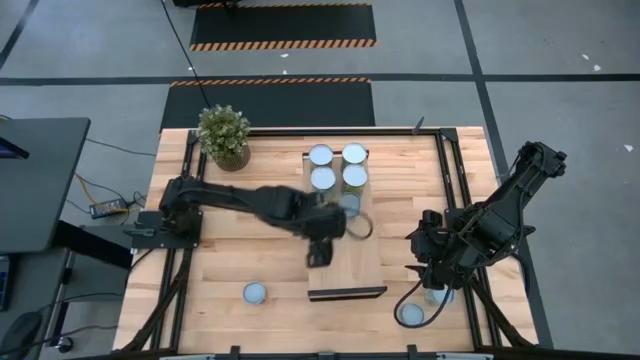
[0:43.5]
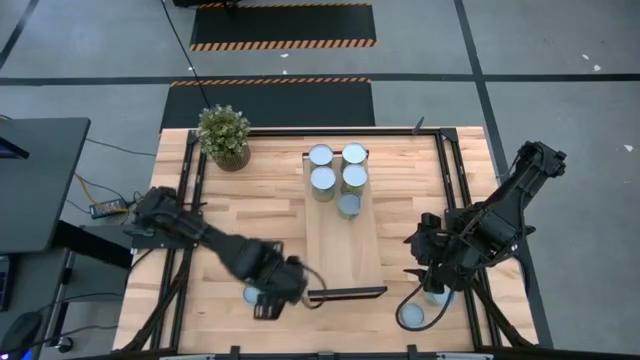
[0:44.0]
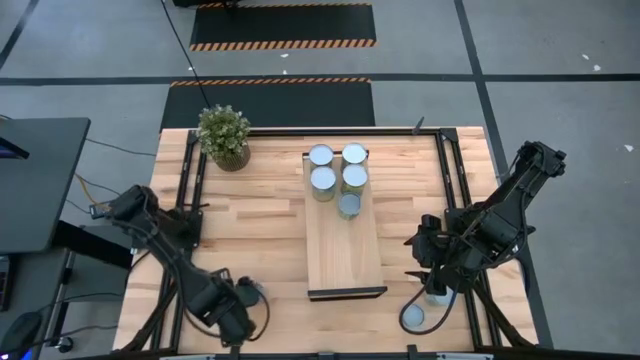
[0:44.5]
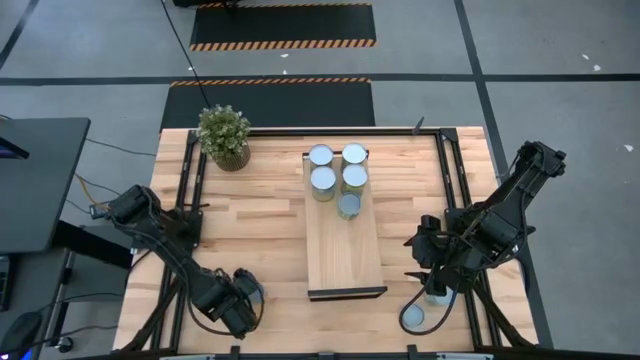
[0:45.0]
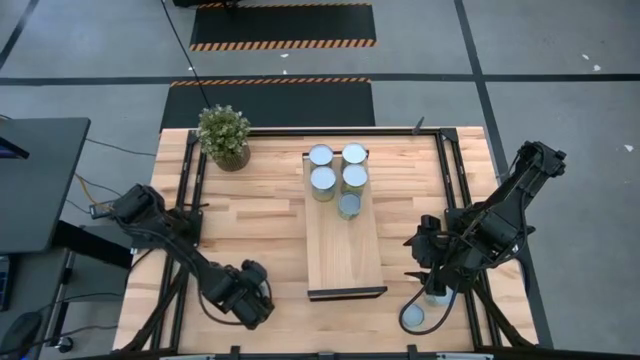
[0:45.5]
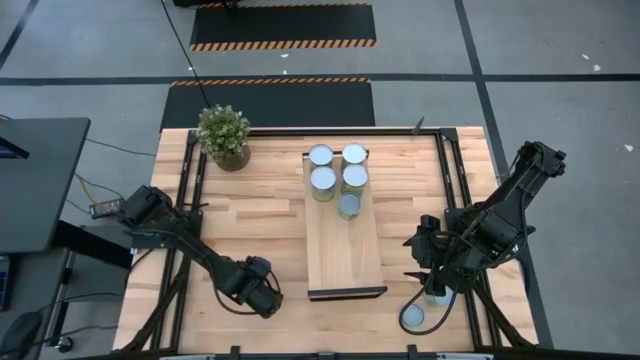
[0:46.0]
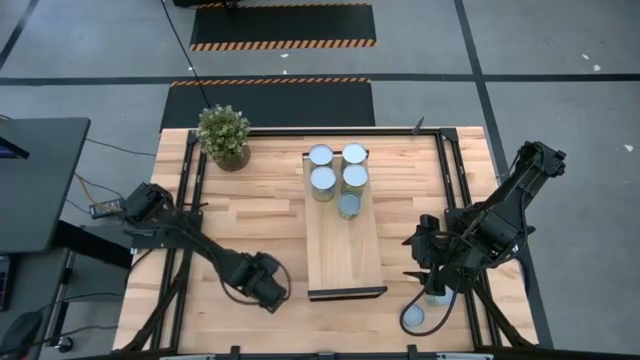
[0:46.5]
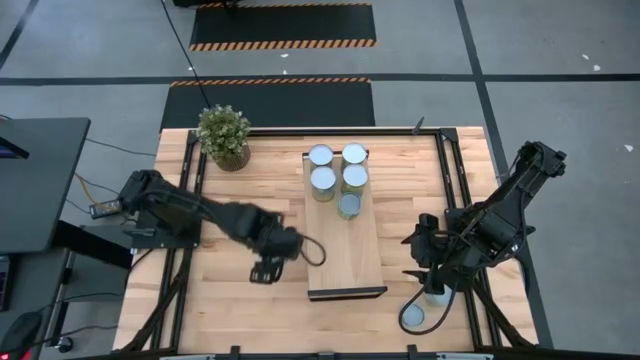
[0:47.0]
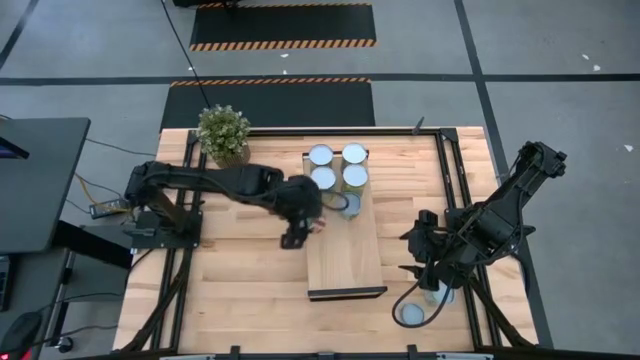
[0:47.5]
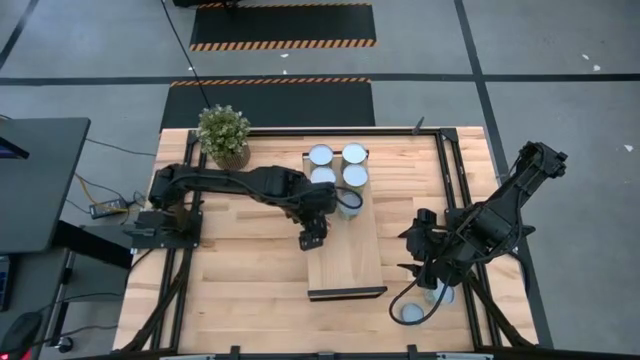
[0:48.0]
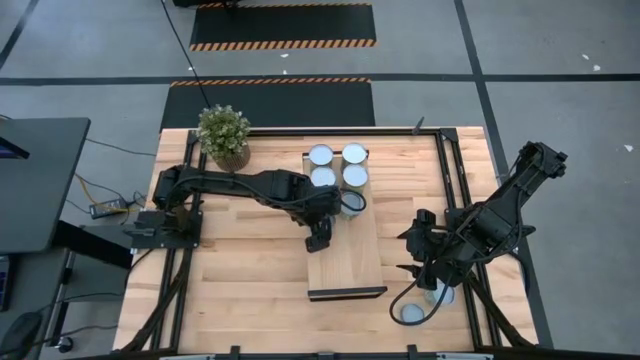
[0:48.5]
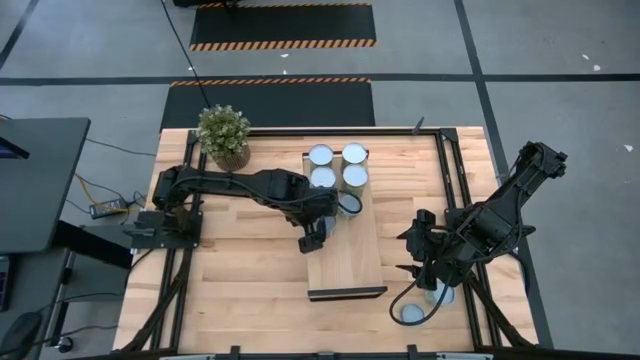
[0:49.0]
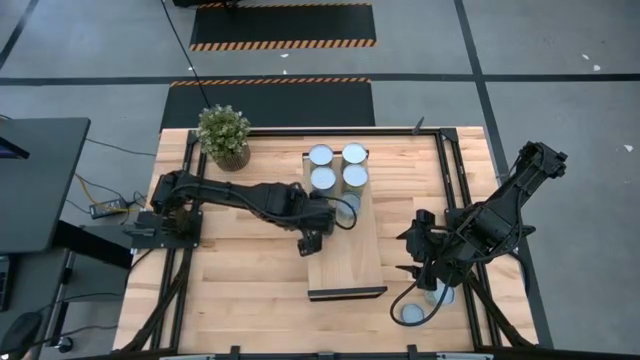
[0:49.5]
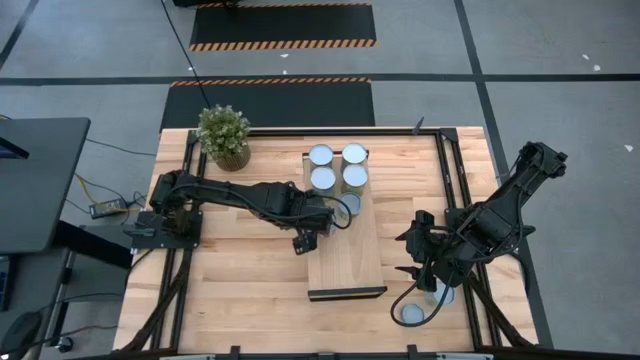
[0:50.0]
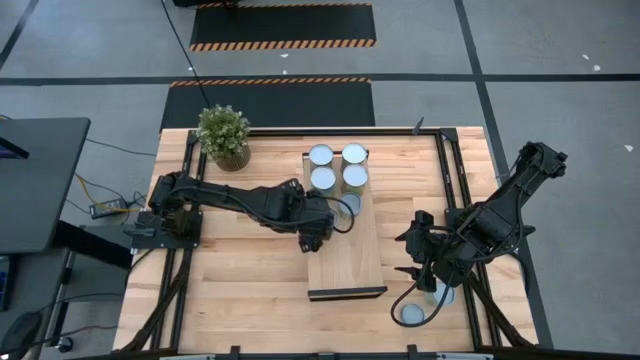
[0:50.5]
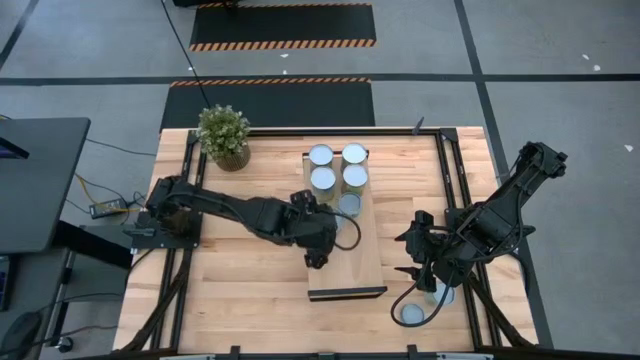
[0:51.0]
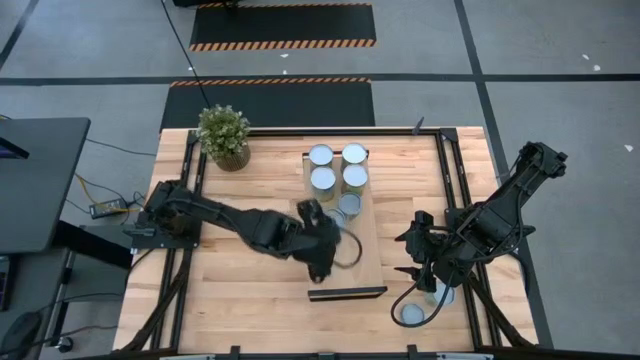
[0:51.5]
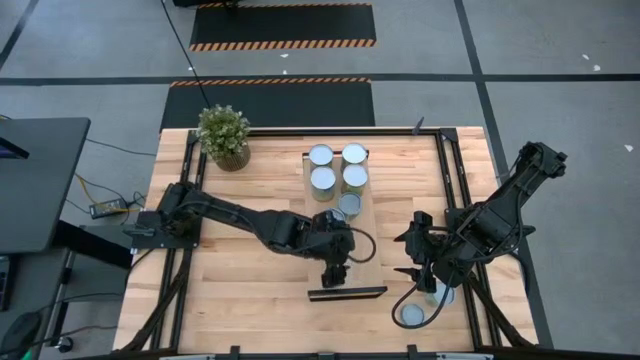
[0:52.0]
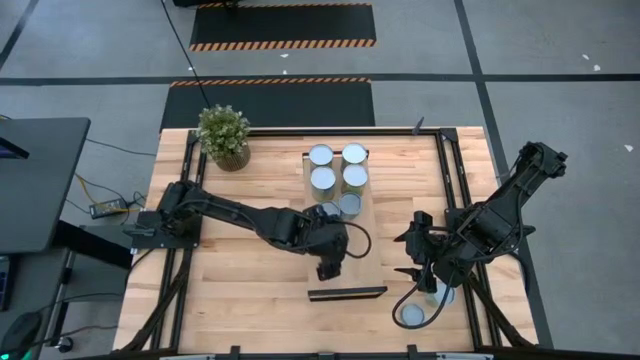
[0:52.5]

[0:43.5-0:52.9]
Task: Pick and place cans onto a shelf
Put the canned tomatoes on the shelf

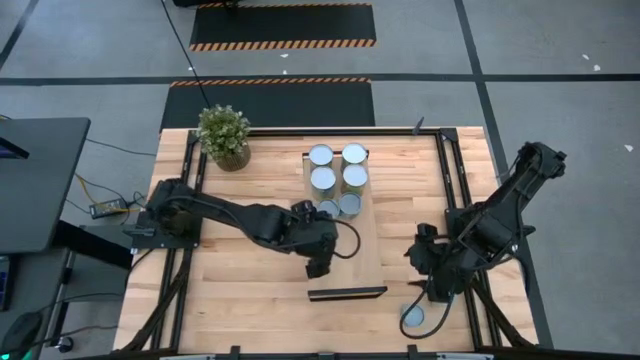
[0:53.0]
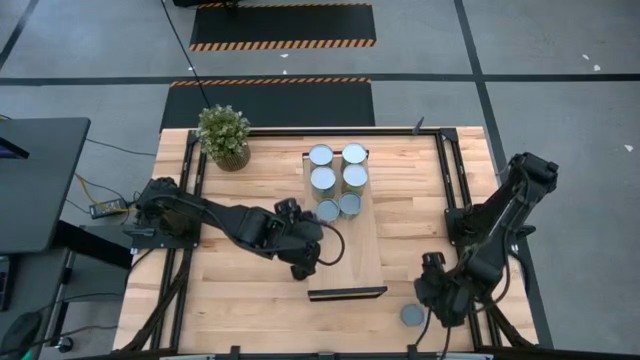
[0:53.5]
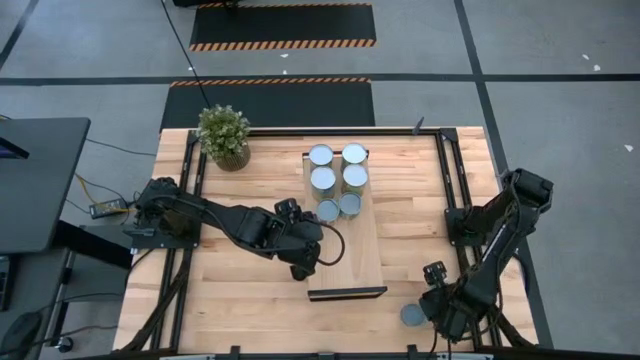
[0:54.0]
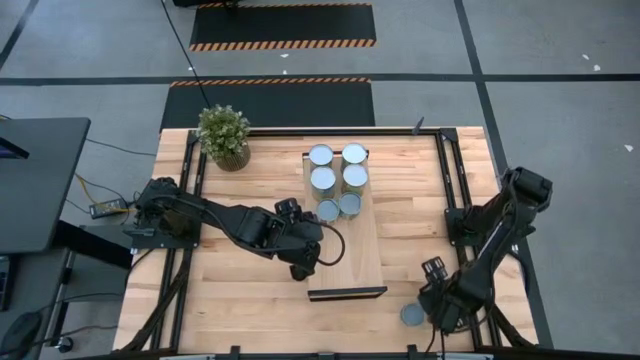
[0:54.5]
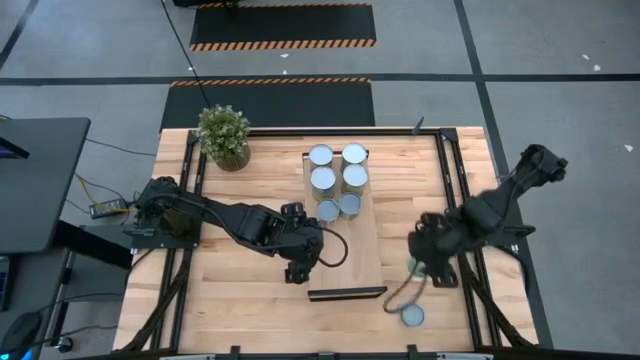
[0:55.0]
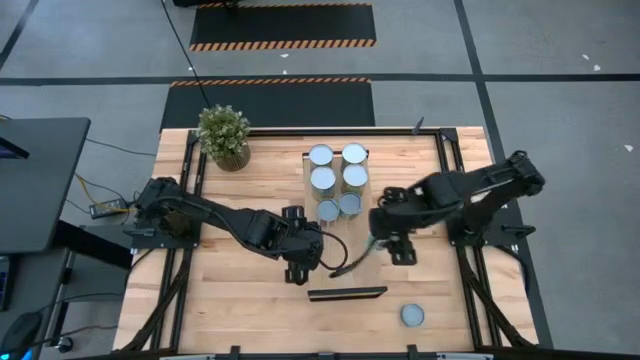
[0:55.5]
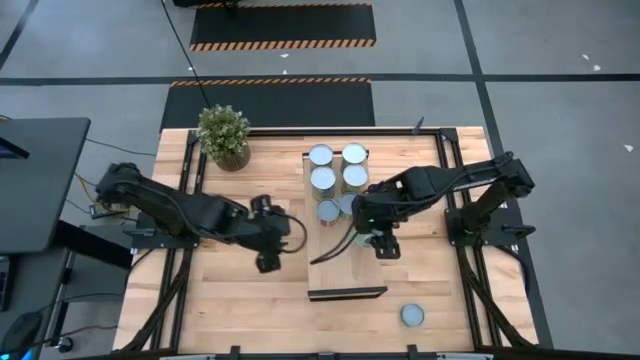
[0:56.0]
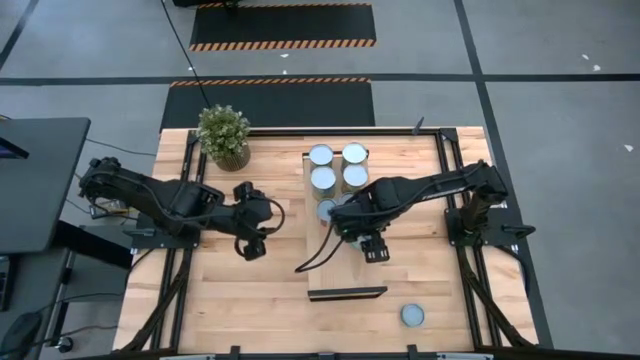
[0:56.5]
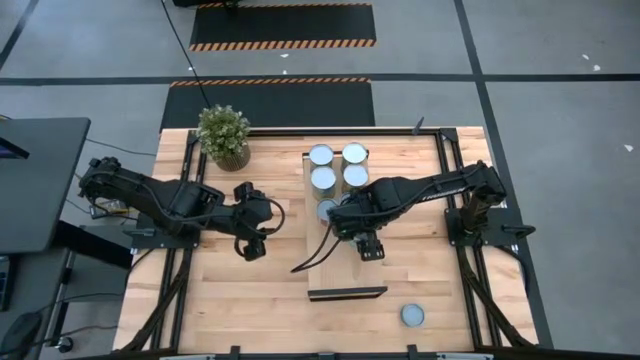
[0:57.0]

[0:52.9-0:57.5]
Put the canned mixed vegetables on the shelf

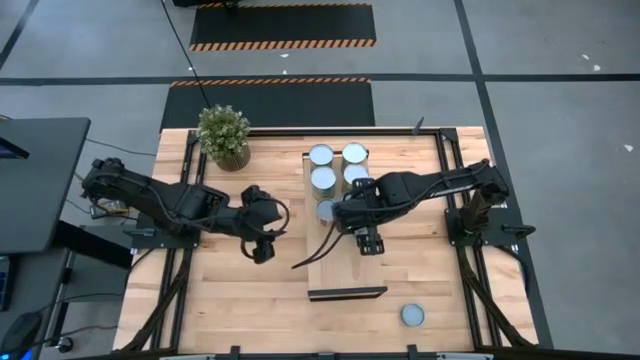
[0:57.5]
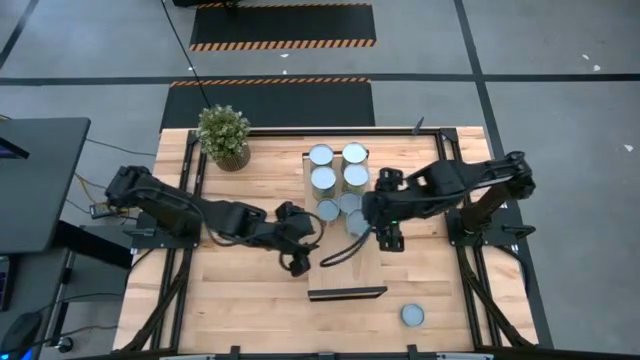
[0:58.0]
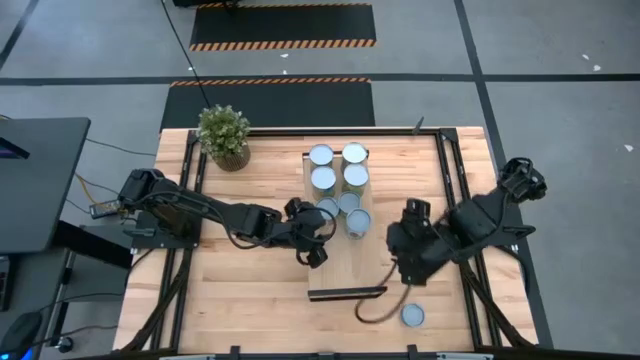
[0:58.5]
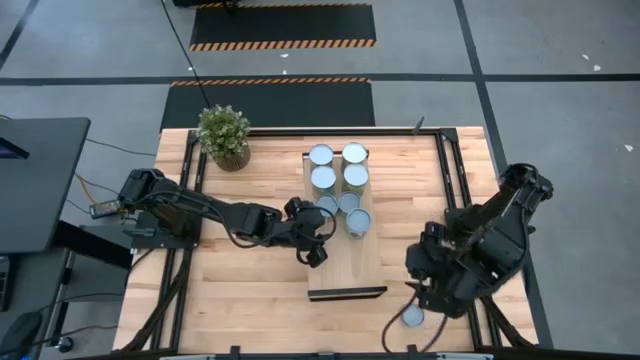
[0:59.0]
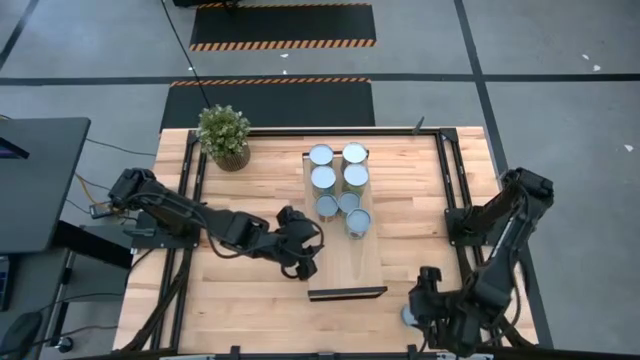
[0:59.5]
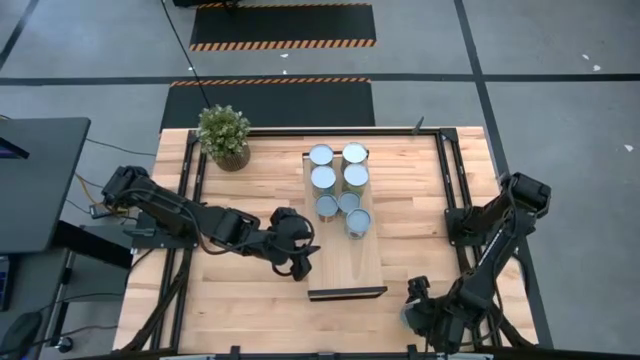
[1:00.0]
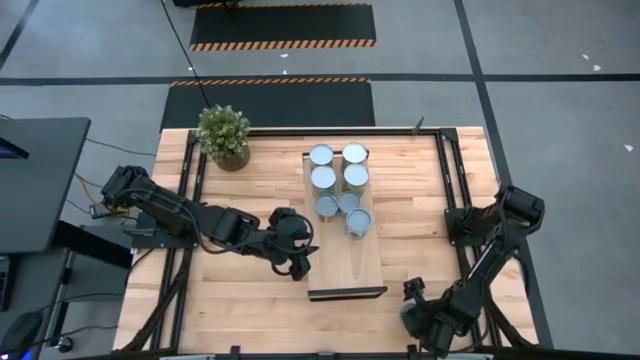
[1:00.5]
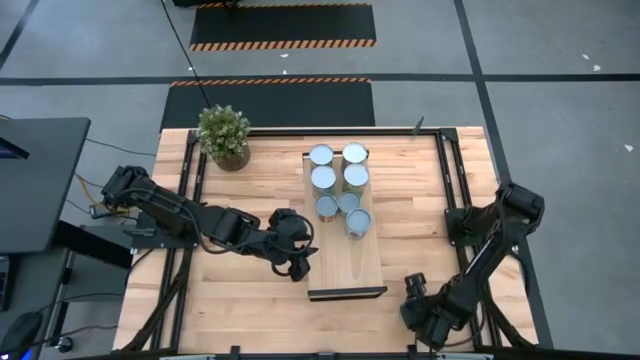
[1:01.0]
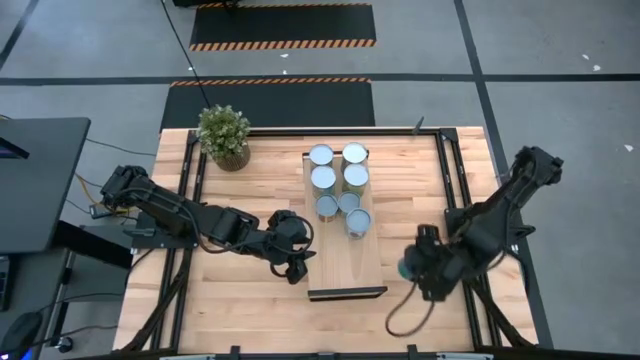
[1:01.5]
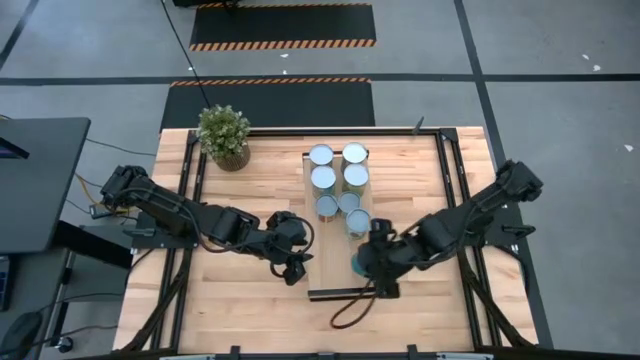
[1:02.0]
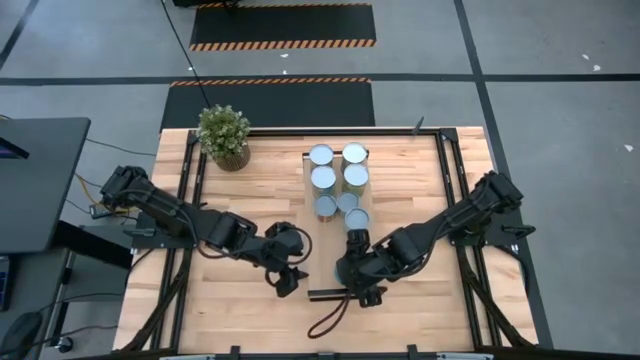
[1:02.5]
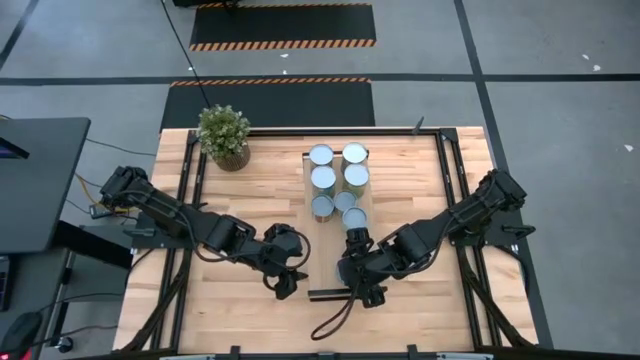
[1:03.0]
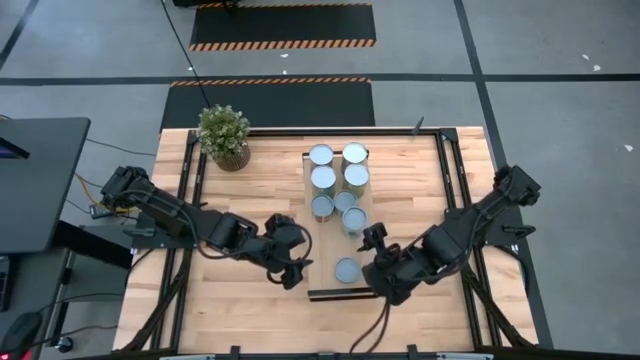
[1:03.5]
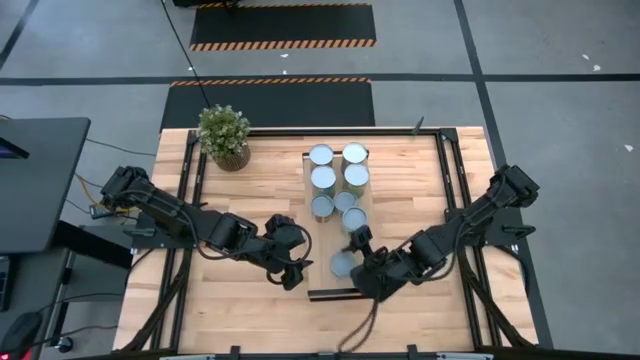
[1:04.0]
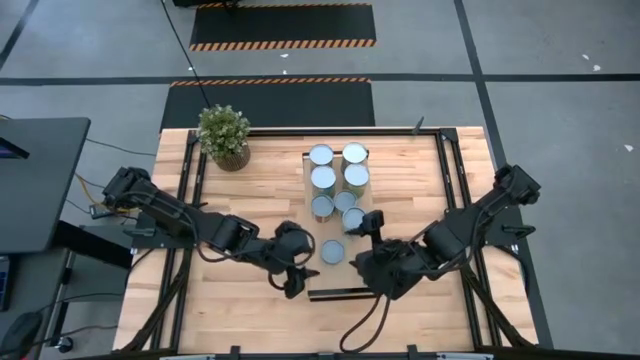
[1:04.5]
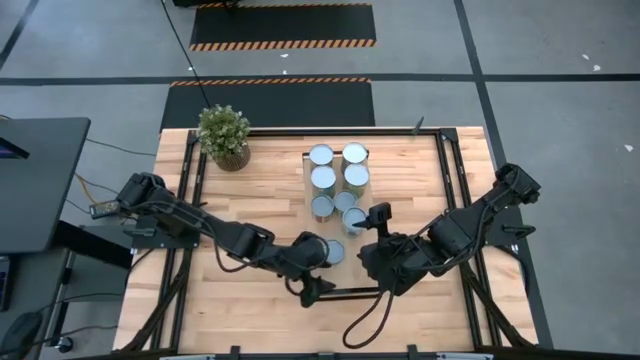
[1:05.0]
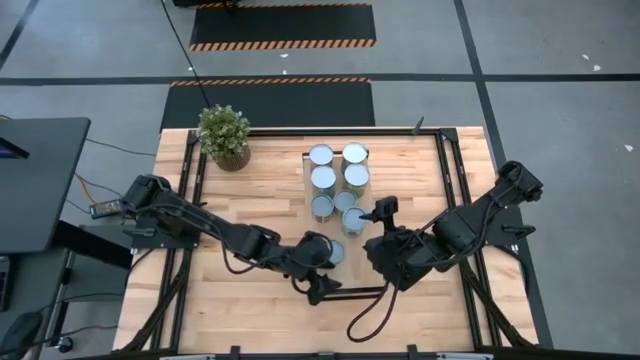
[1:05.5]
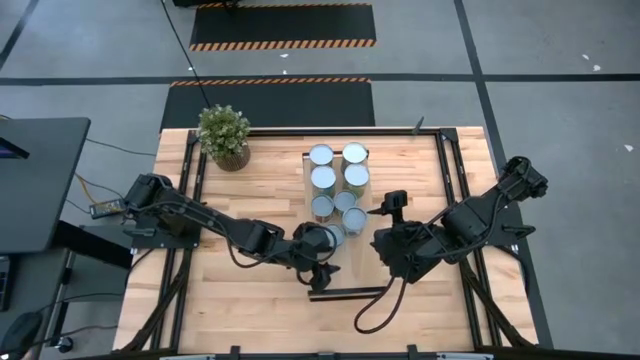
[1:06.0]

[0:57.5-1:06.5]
Put the canned tuna can on the shelf
